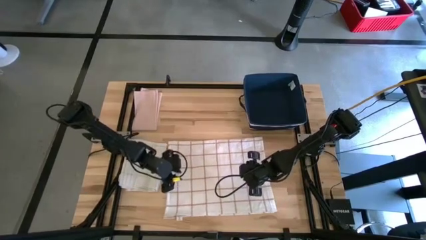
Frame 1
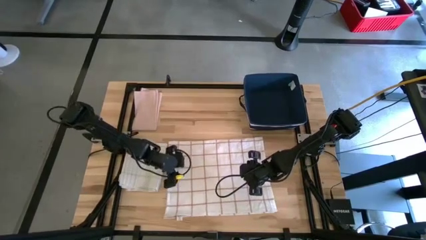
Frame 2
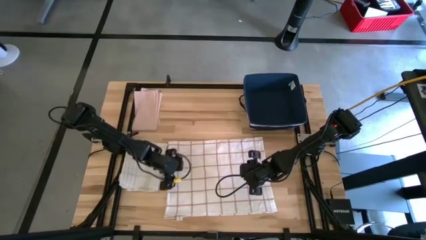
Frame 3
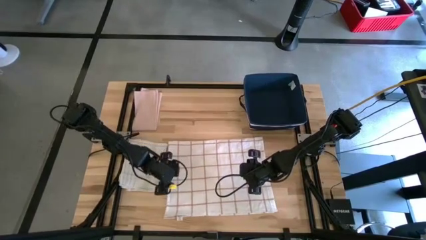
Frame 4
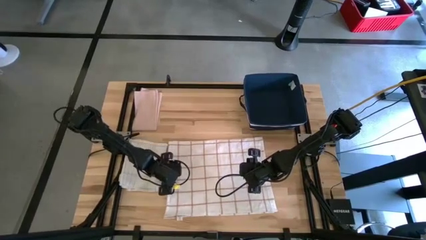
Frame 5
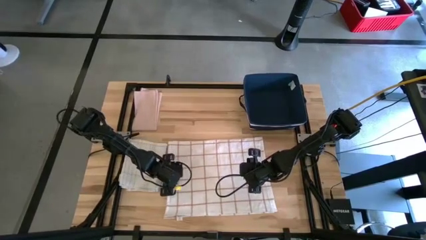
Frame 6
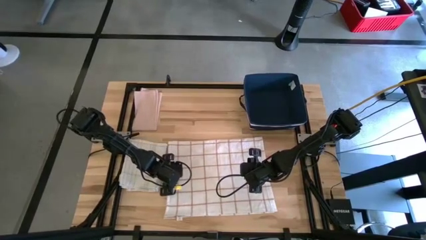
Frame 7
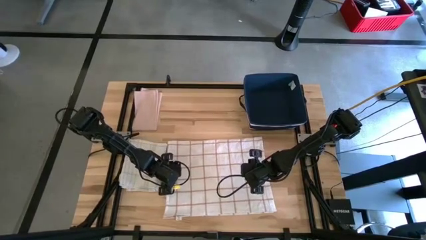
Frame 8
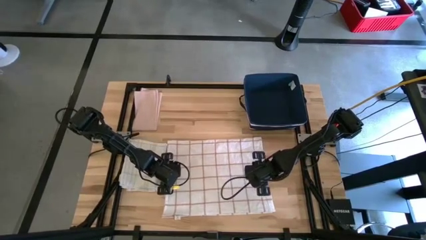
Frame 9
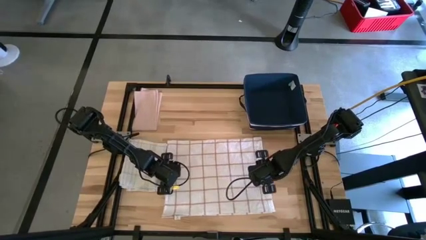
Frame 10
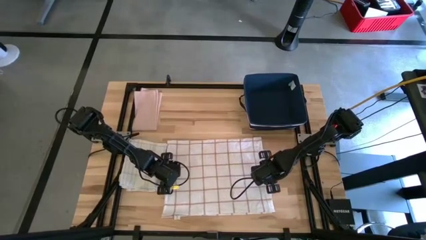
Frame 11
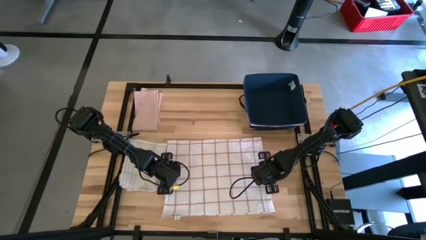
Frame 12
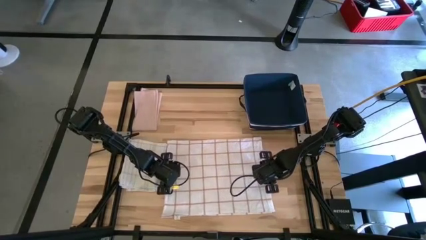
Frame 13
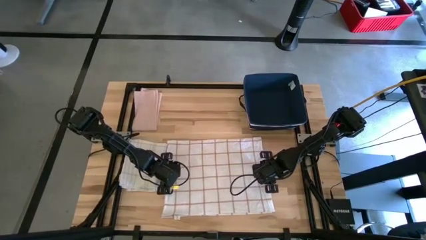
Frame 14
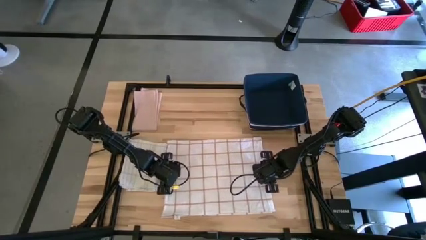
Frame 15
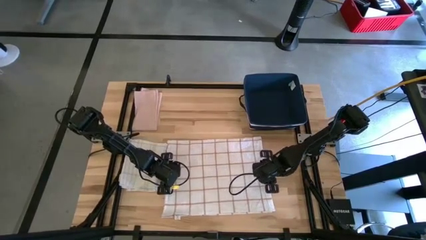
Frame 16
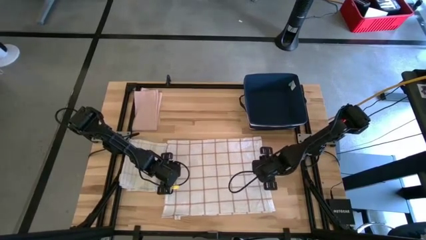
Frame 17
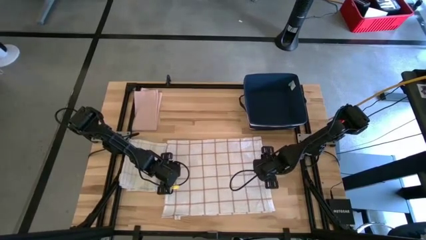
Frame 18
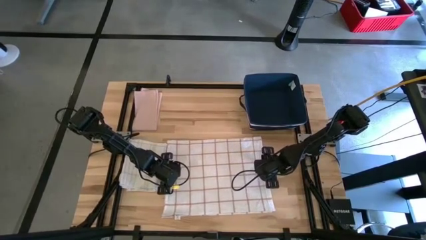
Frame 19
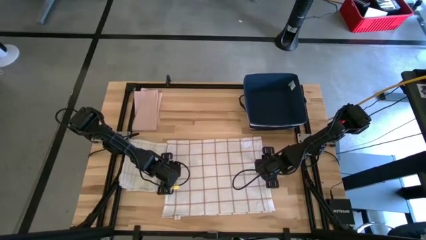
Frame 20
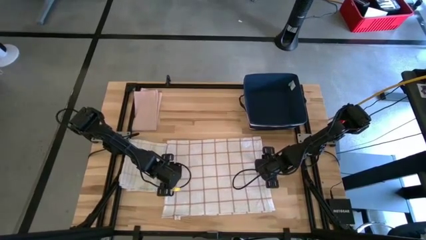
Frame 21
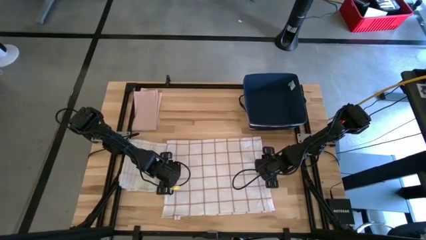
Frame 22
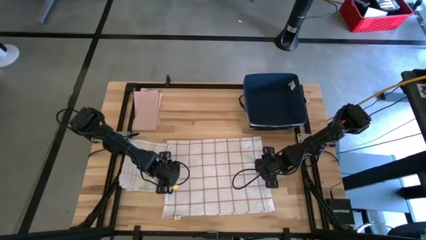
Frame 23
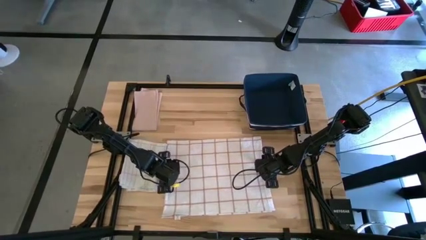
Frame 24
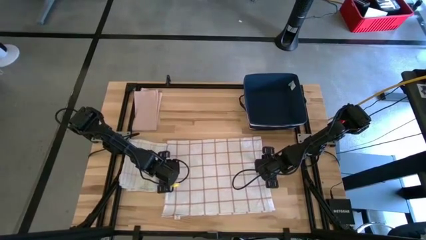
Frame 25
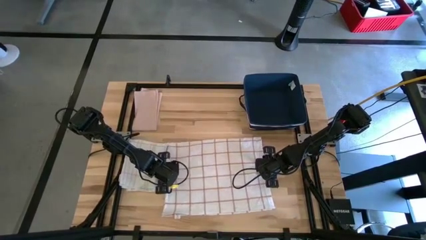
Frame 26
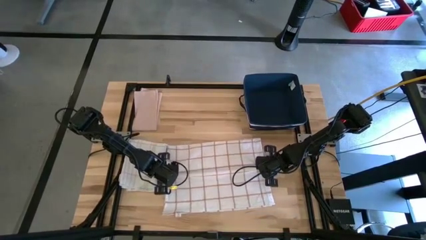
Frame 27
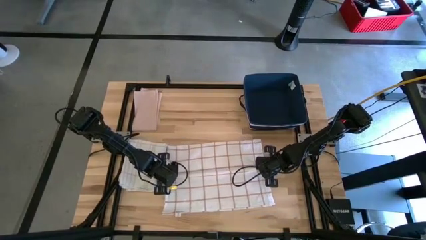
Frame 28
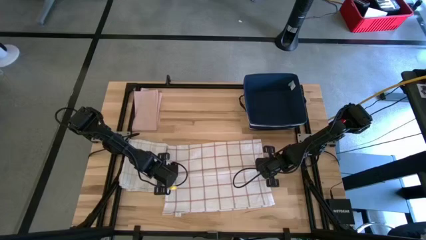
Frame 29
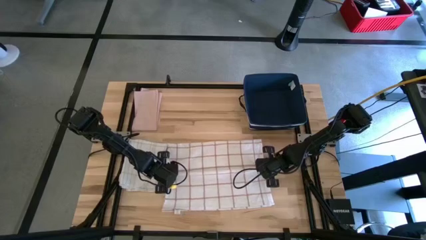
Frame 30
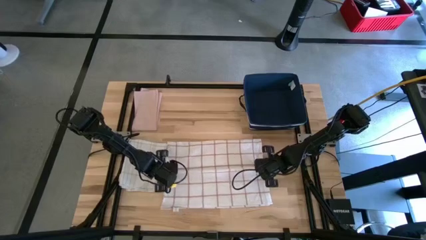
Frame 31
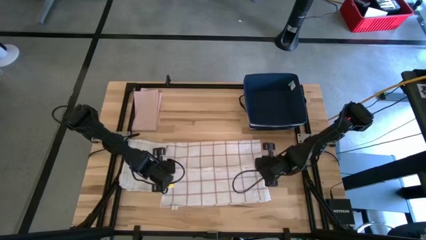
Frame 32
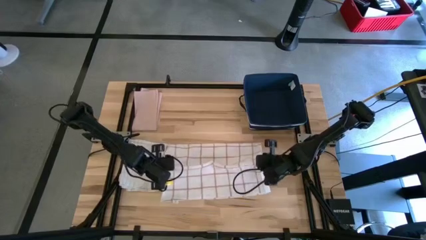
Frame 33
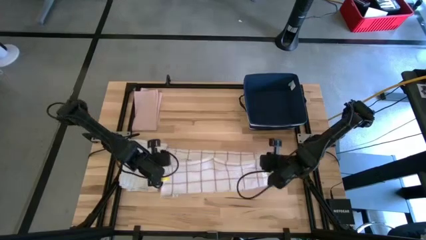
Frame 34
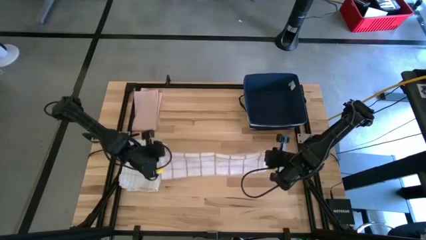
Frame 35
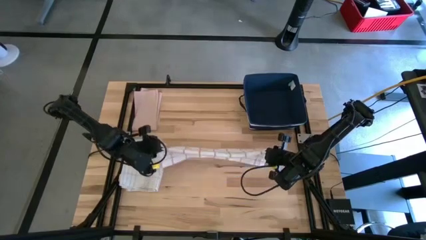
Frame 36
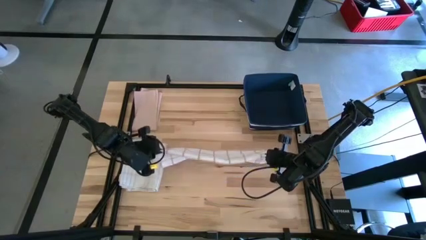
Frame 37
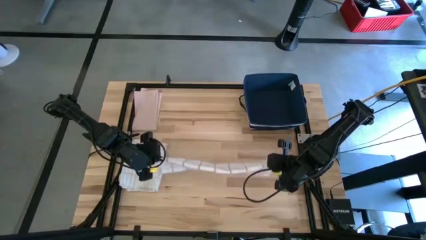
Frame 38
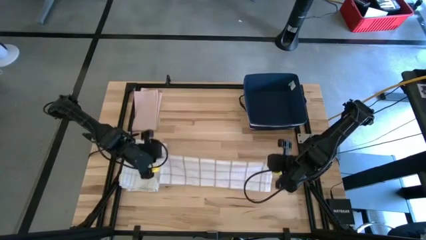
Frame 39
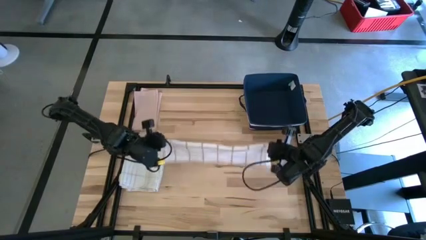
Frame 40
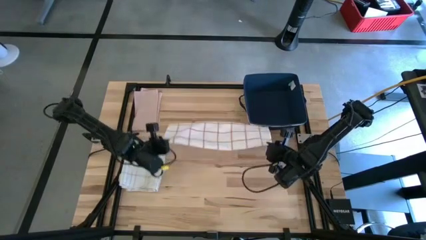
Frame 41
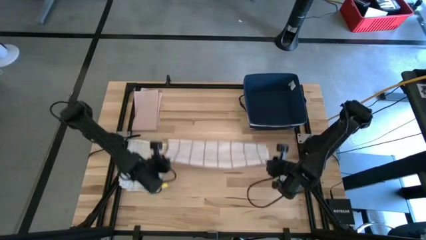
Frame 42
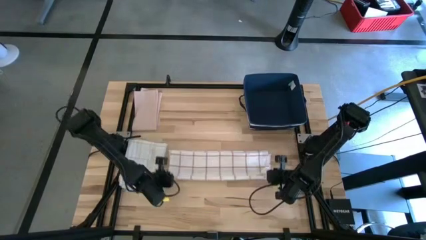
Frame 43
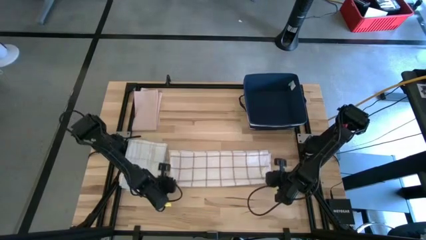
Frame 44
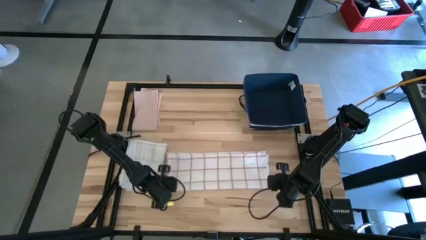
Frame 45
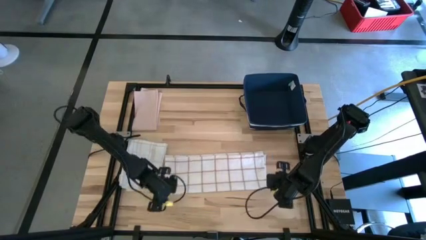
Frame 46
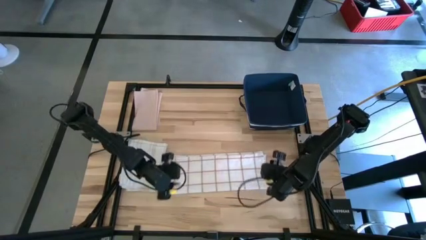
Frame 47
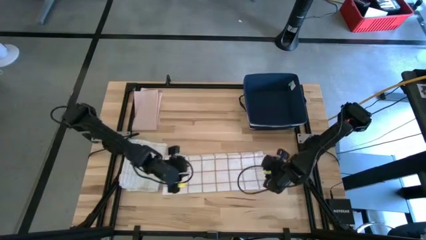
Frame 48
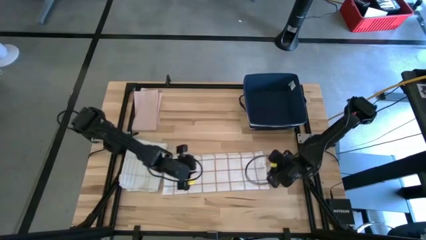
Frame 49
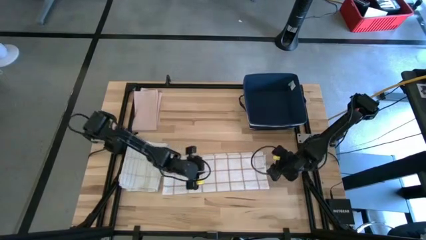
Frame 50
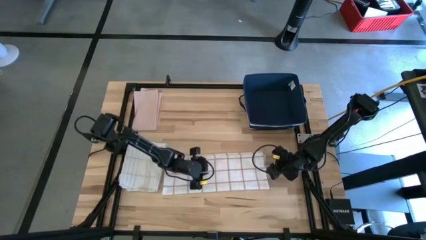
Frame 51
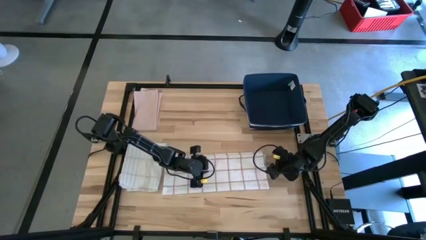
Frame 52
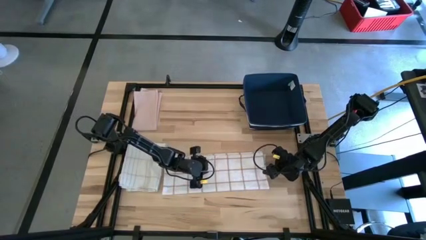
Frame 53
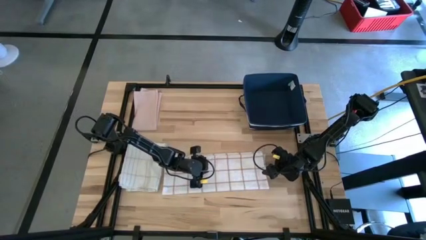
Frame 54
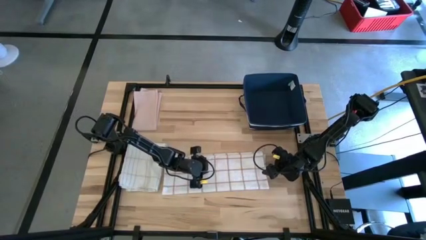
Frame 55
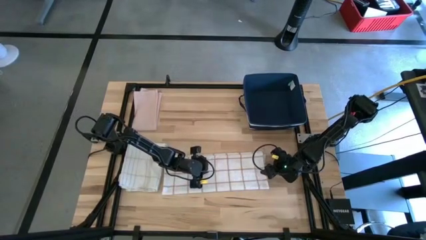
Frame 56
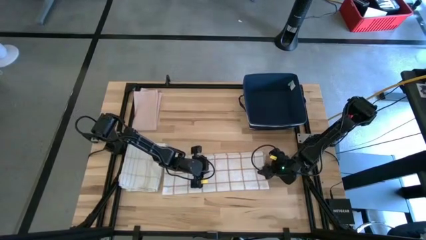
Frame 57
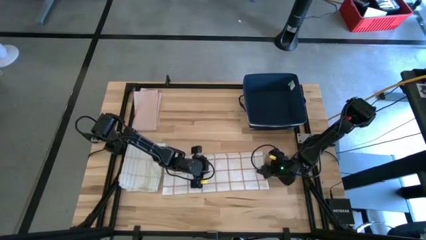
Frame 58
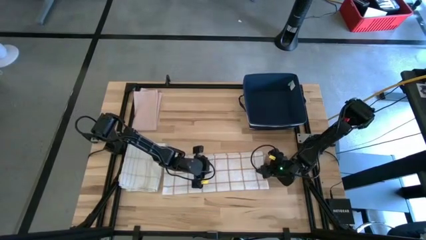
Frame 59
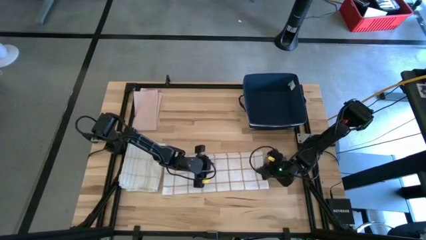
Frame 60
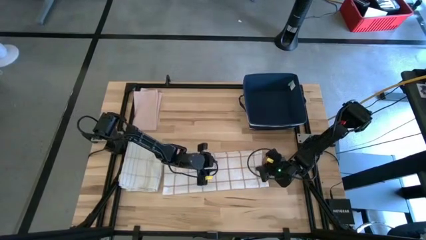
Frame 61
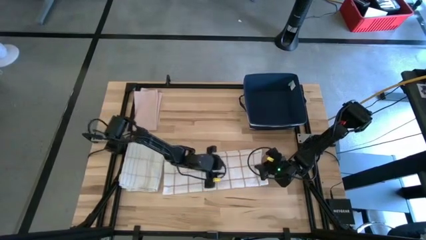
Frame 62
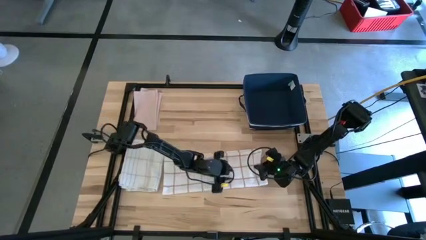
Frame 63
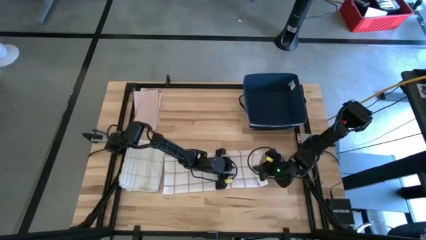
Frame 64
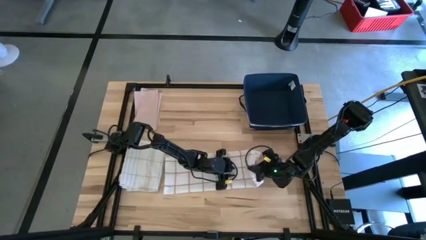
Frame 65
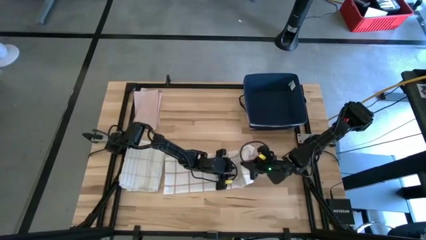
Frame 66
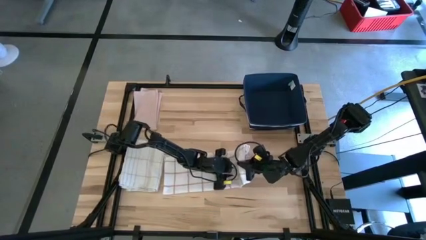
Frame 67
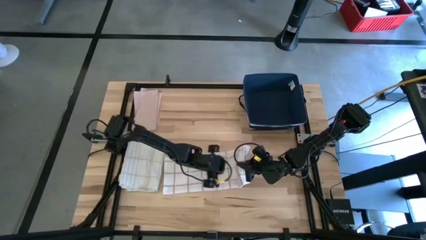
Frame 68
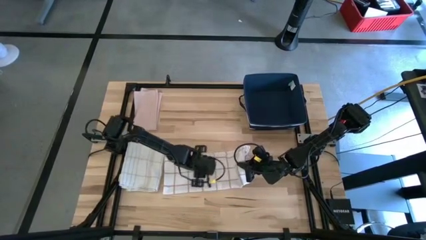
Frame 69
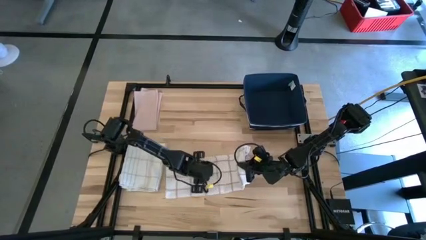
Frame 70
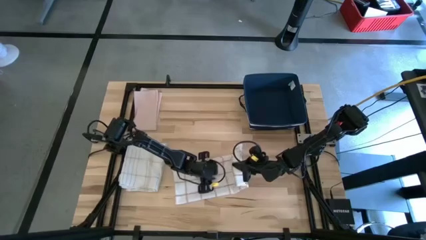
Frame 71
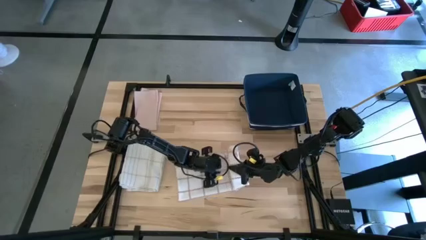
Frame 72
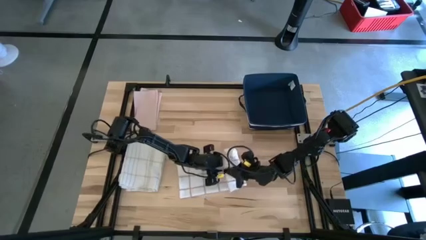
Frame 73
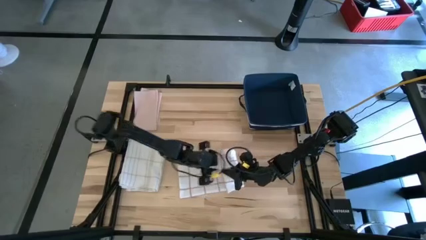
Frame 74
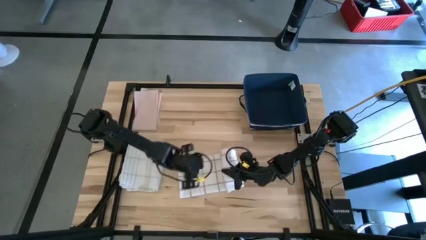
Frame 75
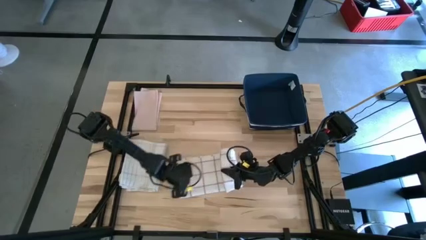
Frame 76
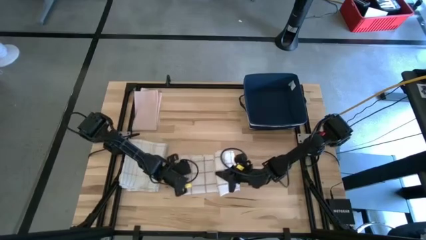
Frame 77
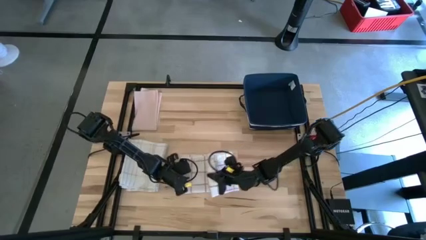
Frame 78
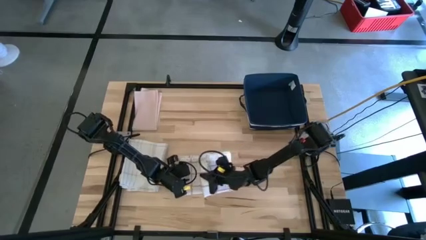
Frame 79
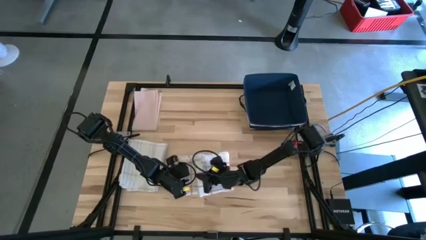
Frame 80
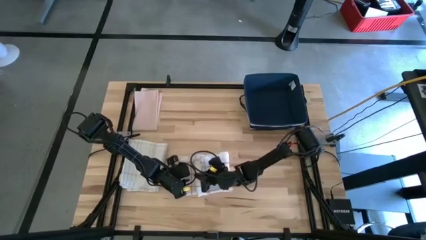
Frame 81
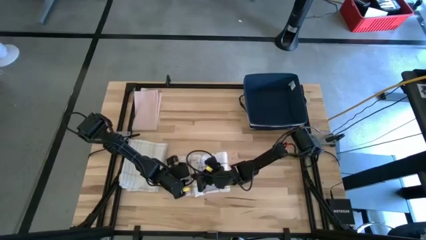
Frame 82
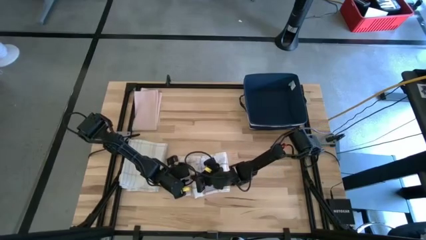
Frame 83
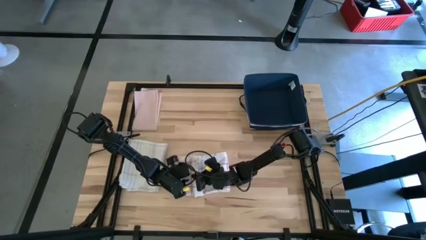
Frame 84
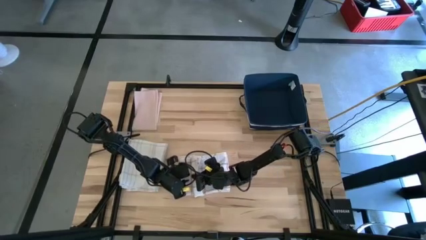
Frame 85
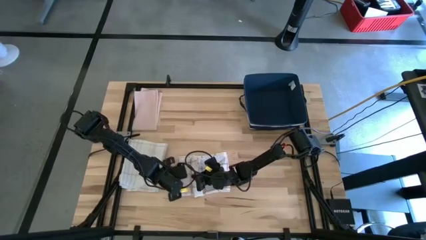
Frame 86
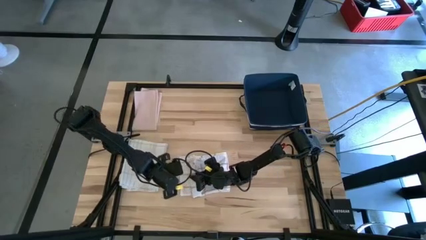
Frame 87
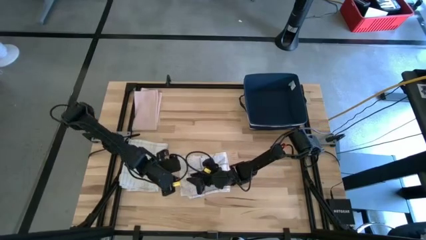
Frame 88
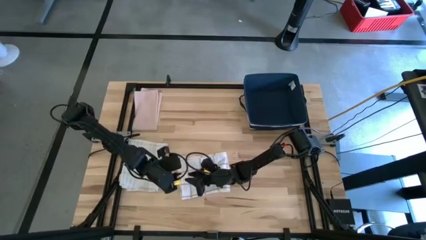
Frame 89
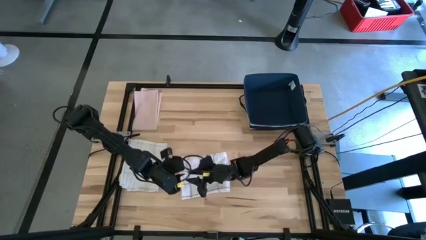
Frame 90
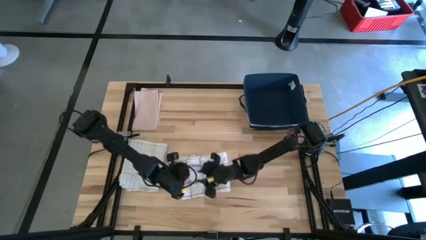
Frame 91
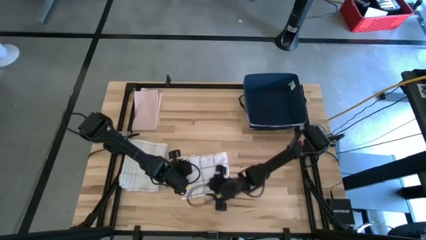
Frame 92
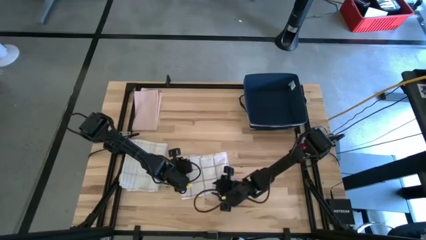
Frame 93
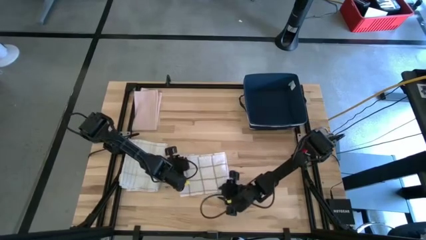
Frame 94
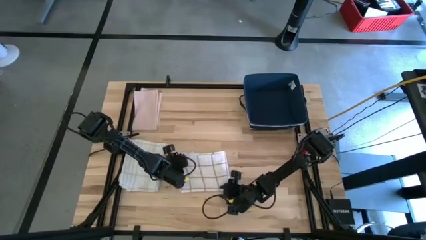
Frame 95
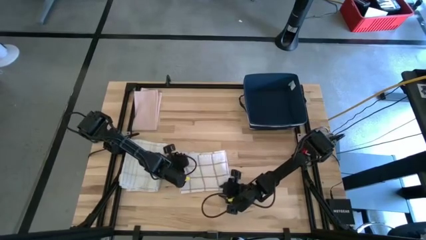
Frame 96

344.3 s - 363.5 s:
Task: Fold towel
Fold the white squared towel
